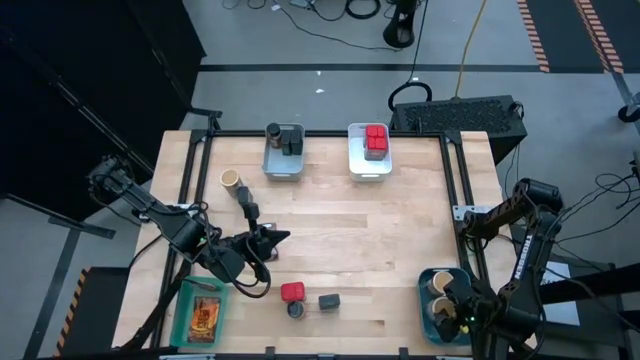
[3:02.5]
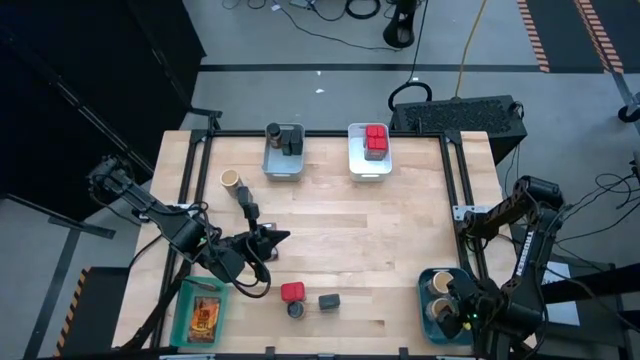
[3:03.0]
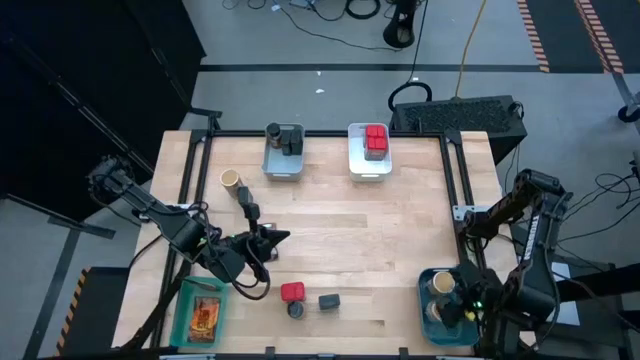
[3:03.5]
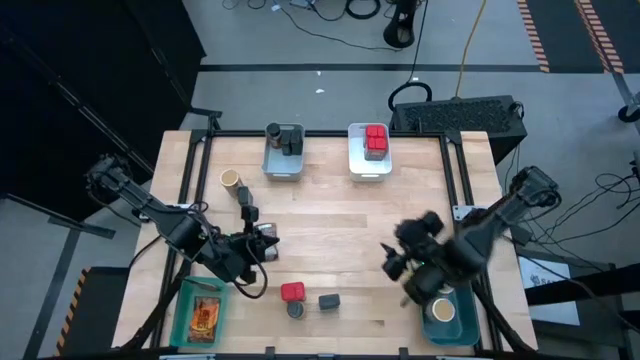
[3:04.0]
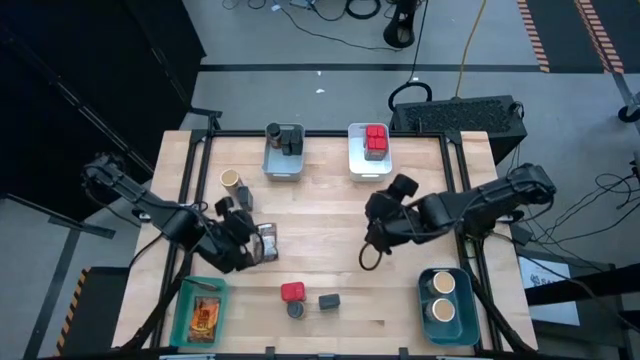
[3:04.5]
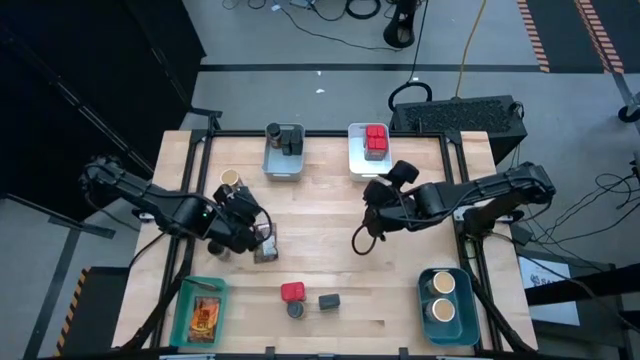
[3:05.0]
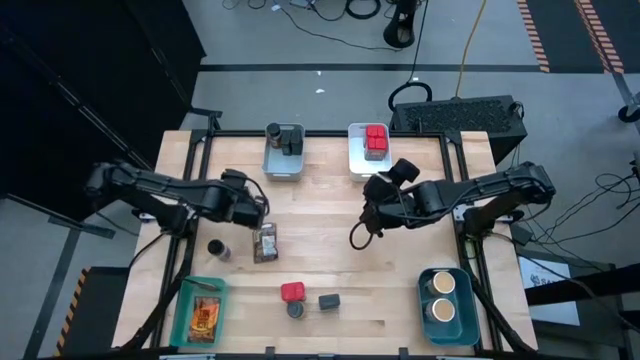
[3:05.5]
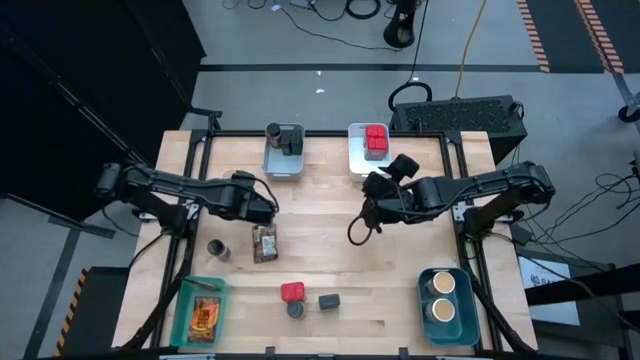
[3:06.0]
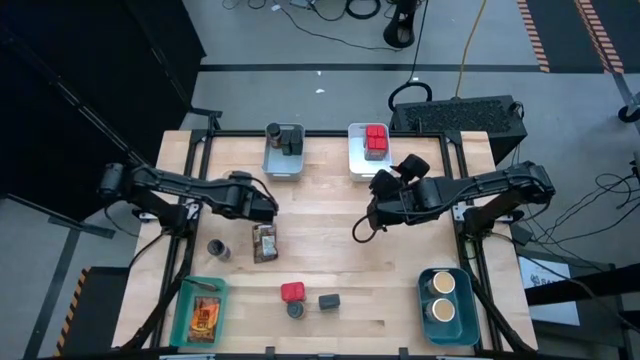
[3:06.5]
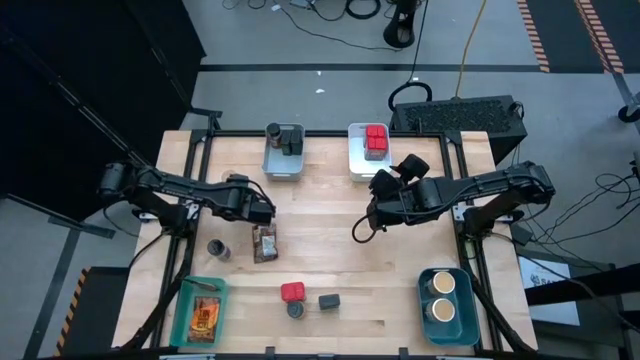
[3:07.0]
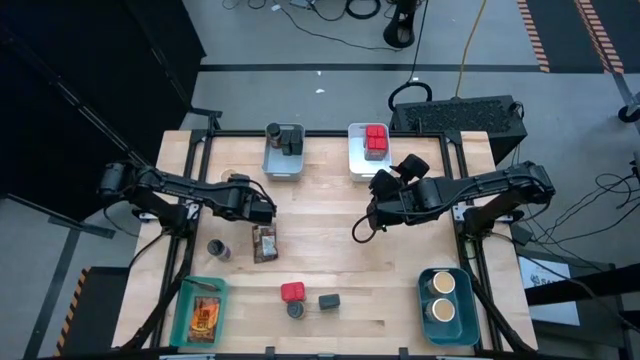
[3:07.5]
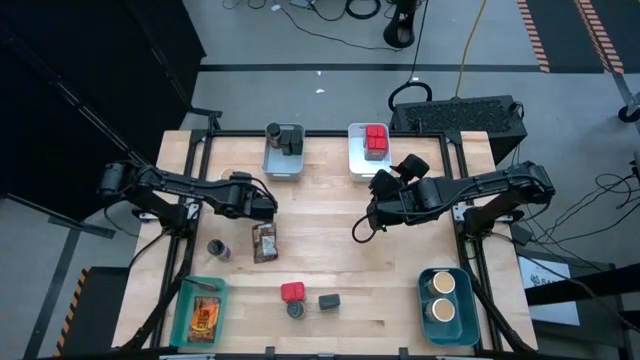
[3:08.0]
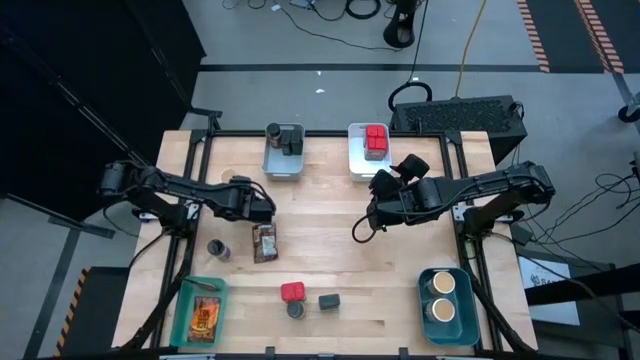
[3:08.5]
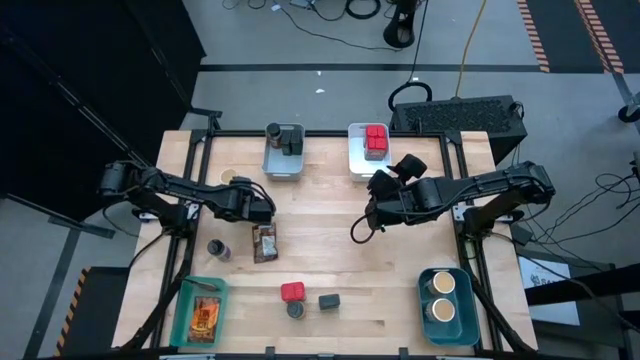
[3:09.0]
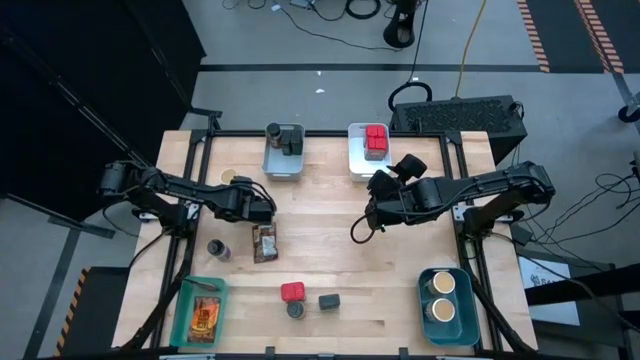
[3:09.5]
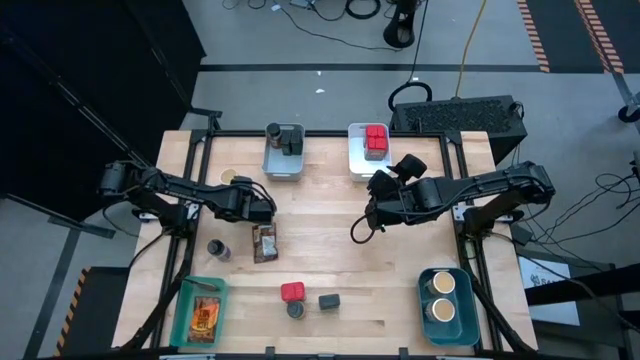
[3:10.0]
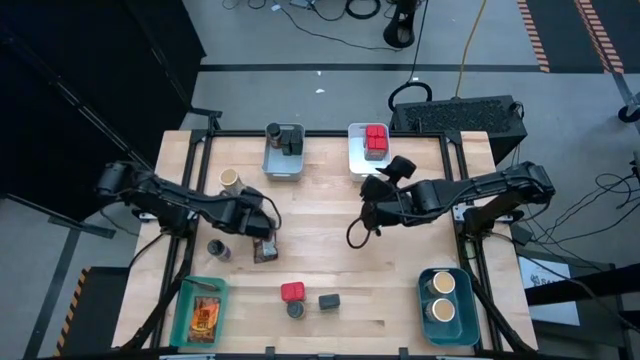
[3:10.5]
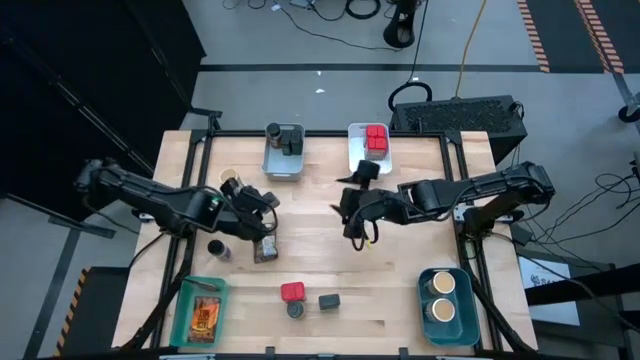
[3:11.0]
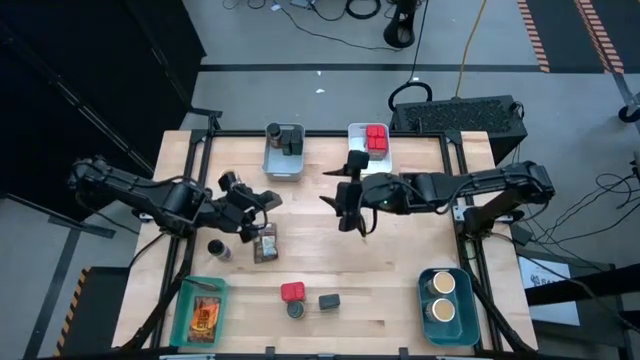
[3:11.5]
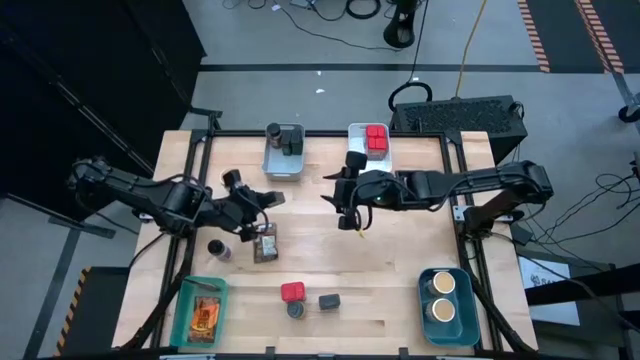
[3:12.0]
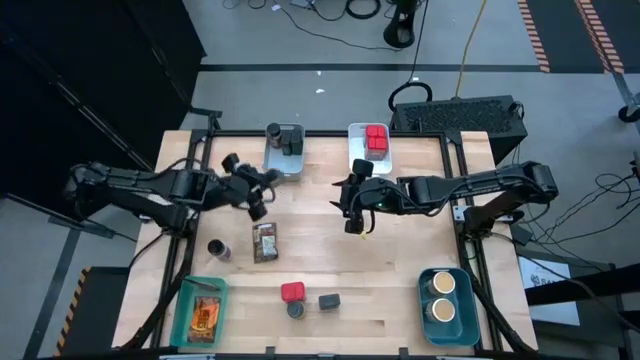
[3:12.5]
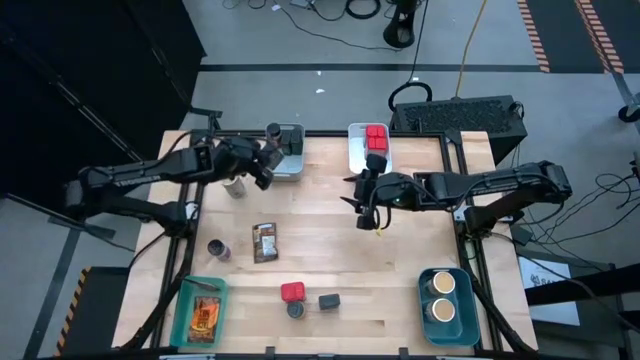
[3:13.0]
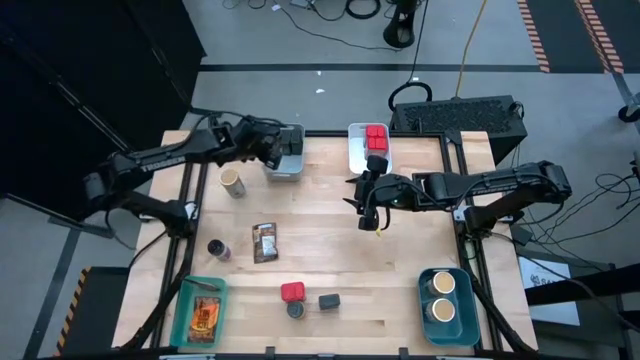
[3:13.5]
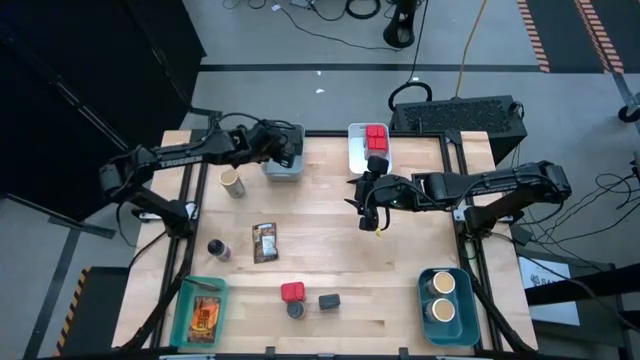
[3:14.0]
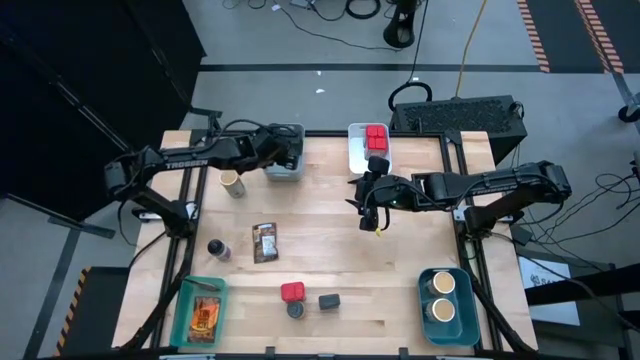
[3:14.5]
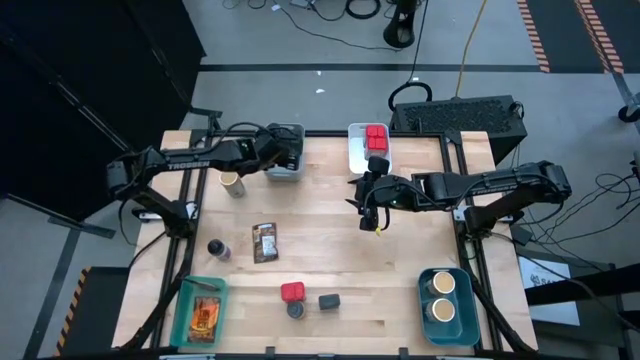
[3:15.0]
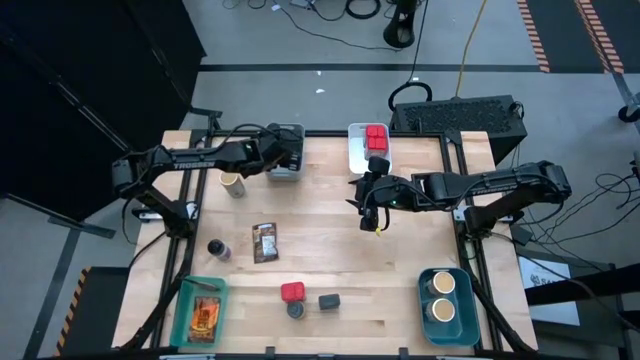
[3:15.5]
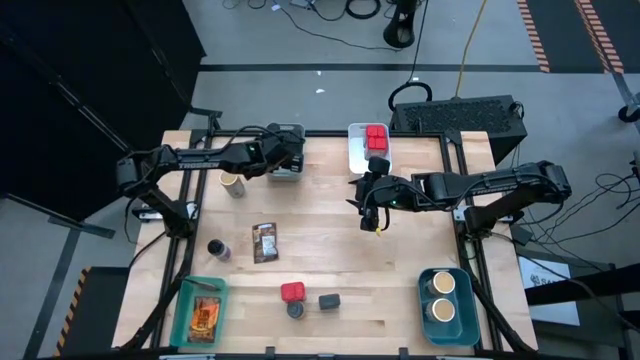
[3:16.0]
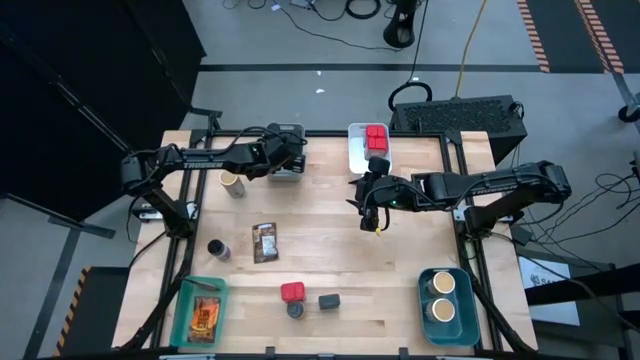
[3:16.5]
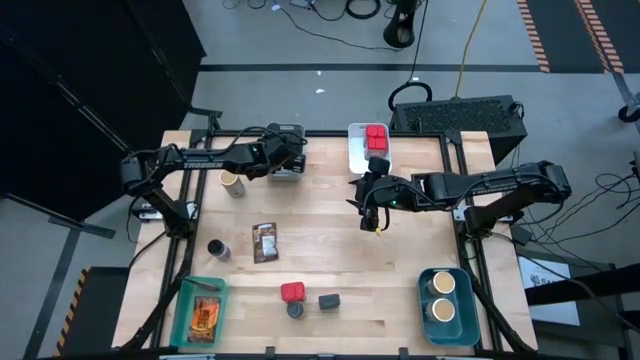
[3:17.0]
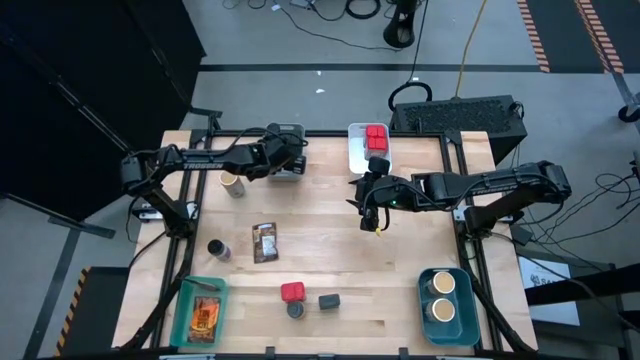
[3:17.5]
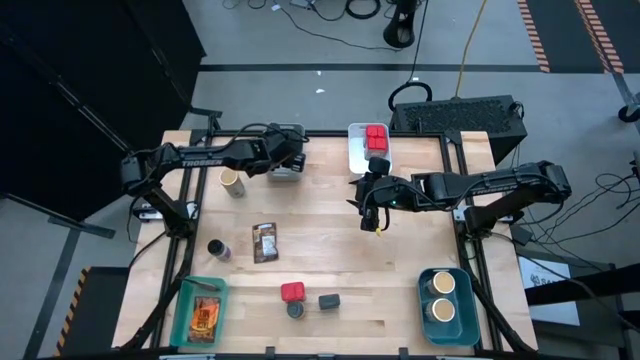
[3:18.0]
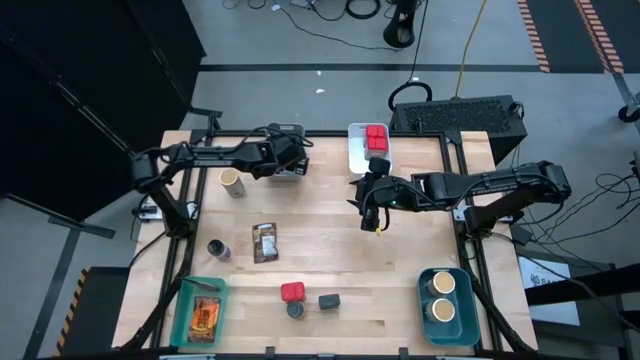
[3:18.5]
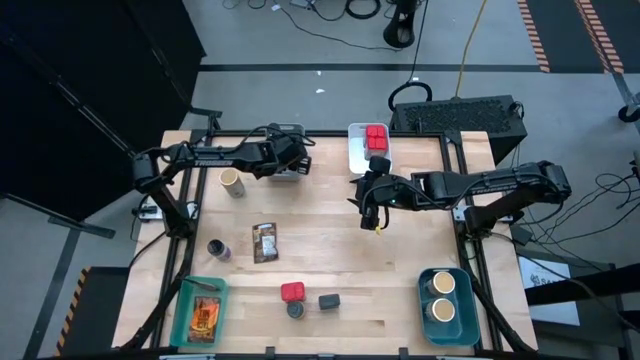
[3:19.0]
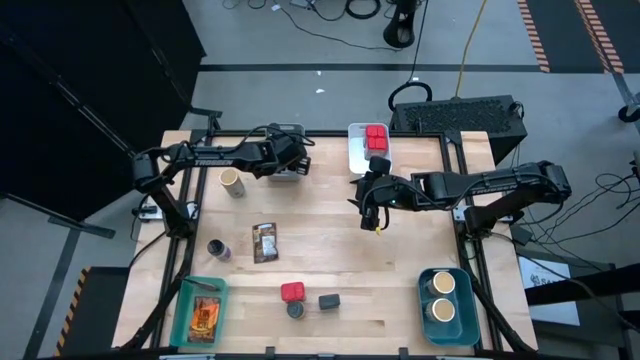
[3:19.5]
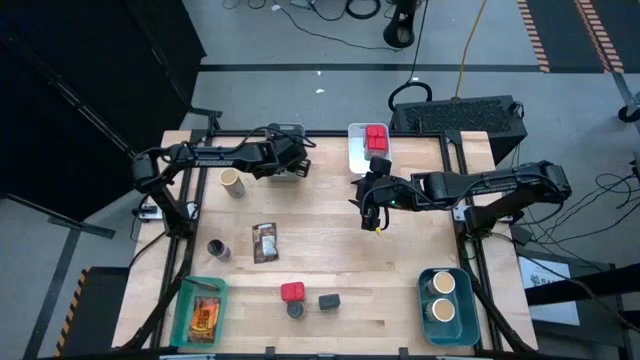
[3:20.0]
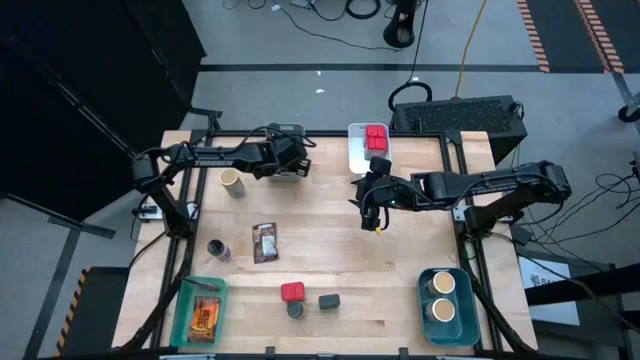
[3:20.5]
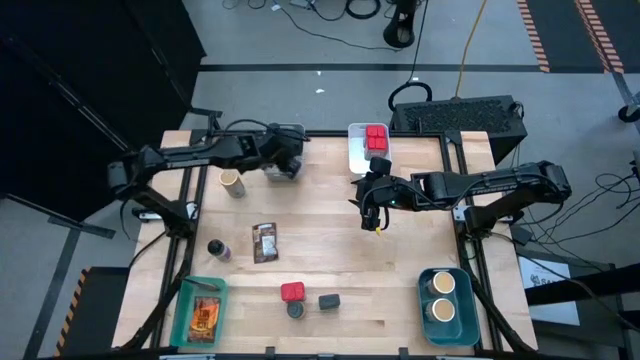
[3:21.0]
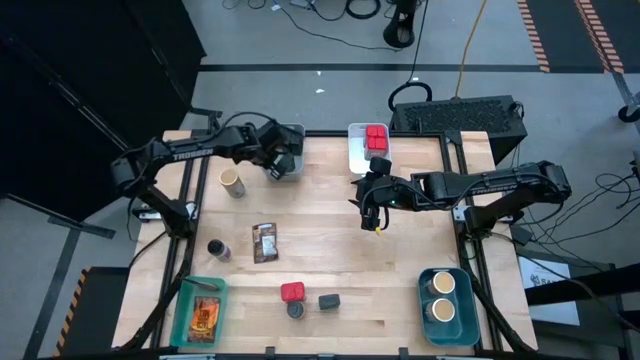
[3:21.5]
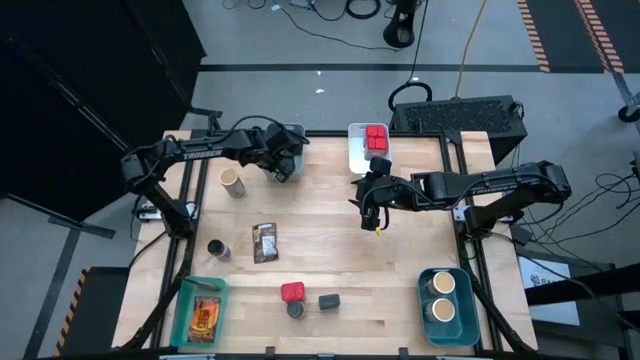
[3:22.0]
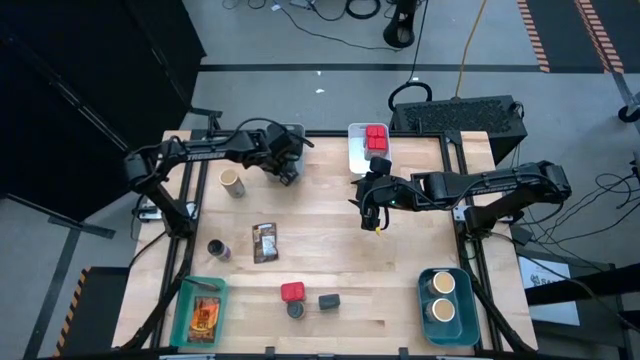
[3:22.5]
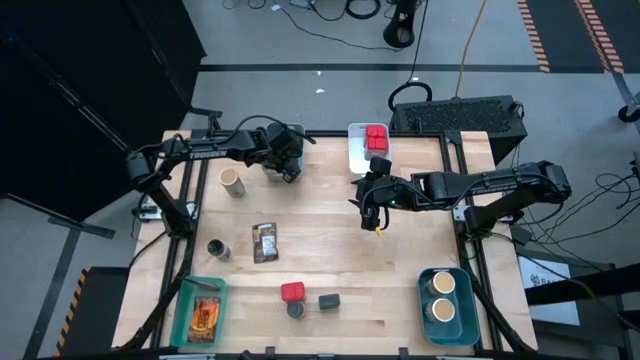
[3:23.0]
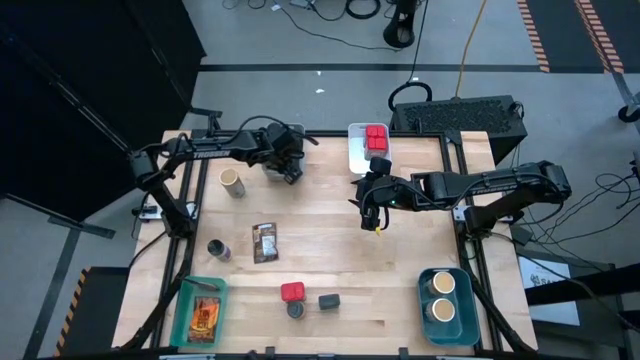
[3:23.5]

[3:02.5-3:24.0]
Task: Sort spices by type
Put the black spice can into the gray bin
